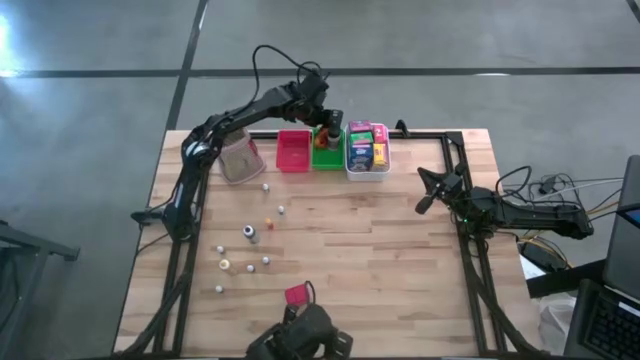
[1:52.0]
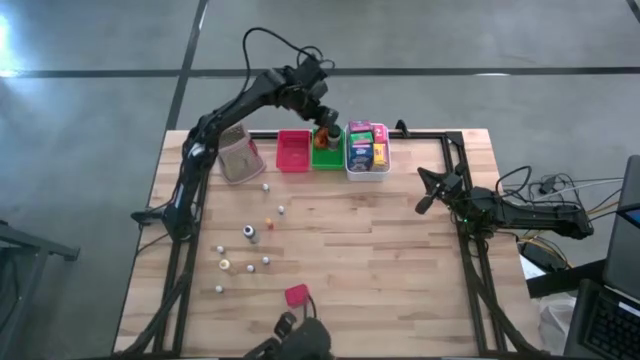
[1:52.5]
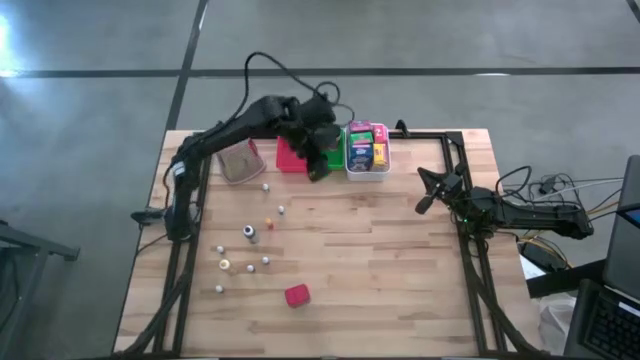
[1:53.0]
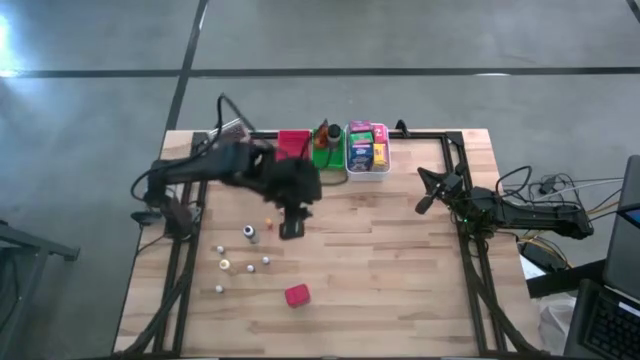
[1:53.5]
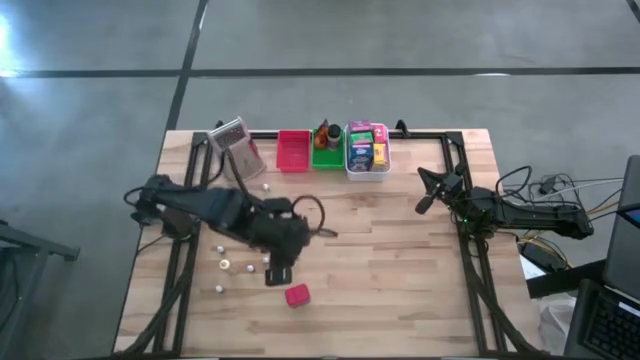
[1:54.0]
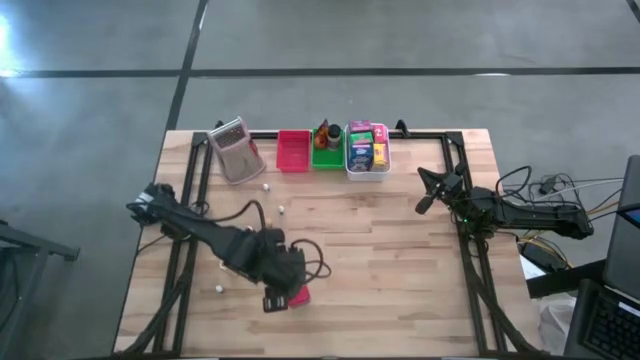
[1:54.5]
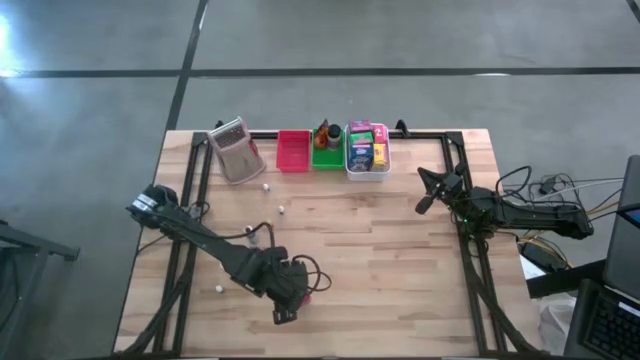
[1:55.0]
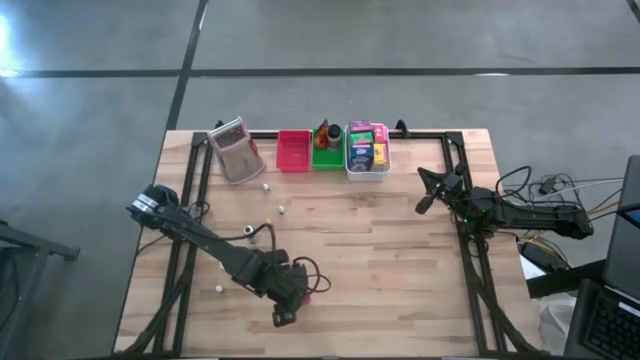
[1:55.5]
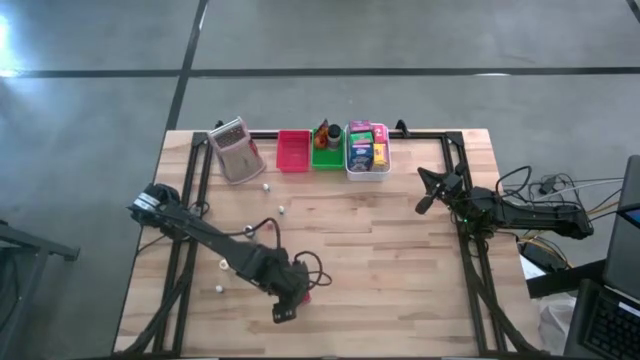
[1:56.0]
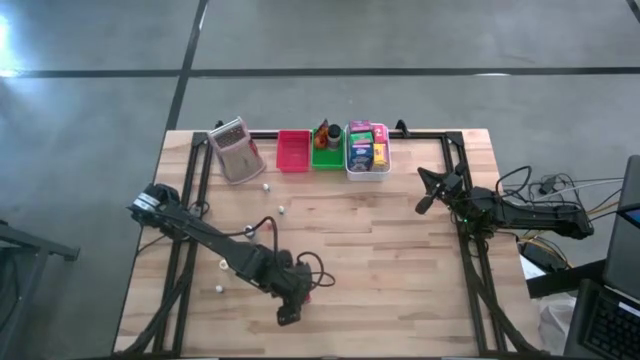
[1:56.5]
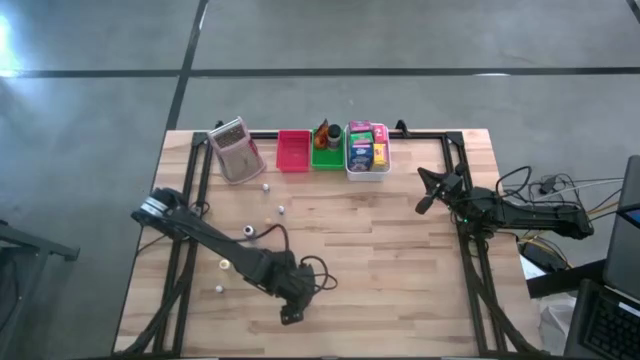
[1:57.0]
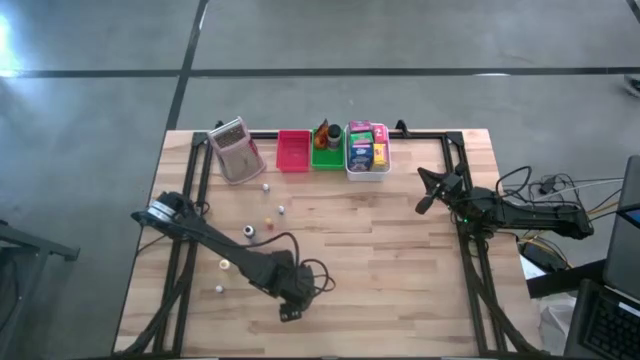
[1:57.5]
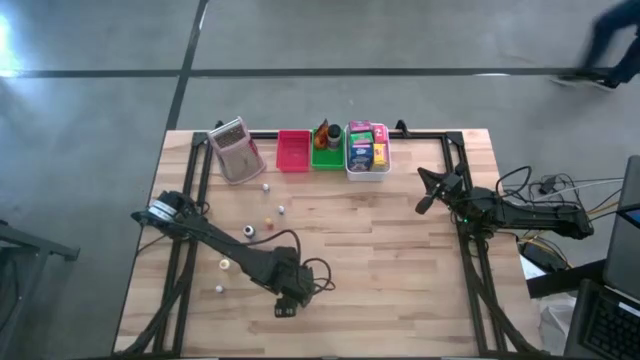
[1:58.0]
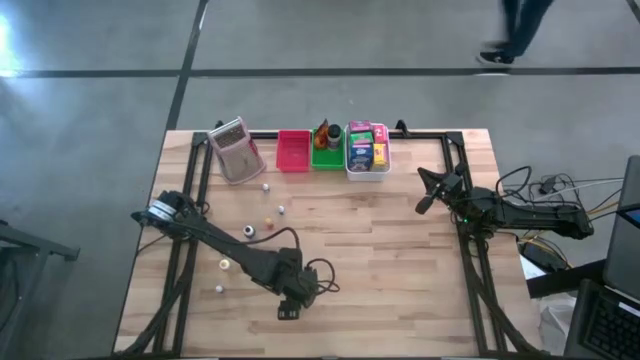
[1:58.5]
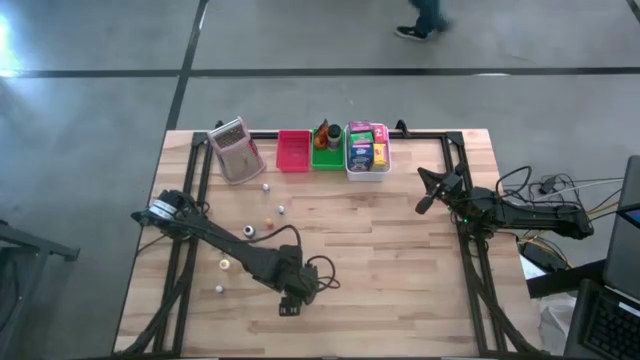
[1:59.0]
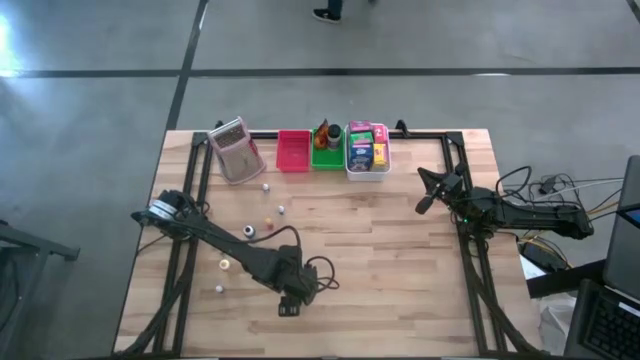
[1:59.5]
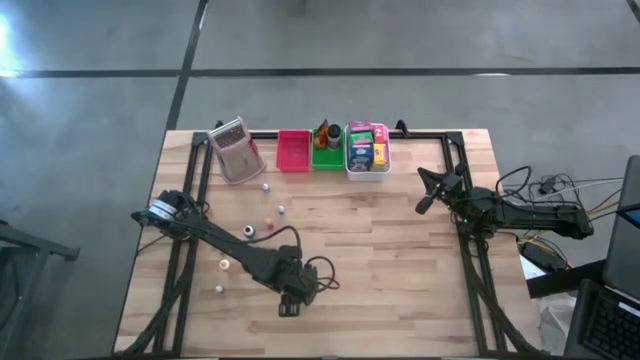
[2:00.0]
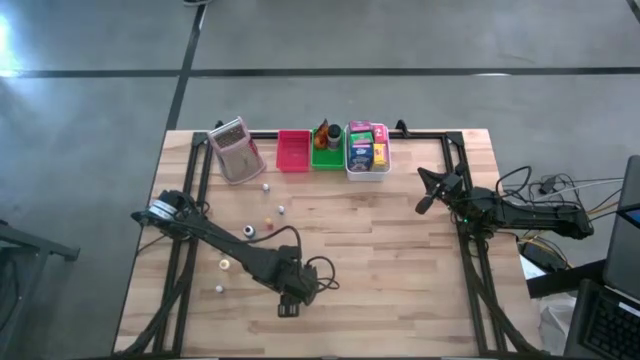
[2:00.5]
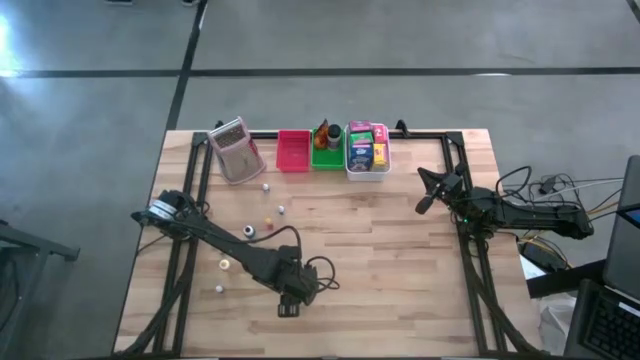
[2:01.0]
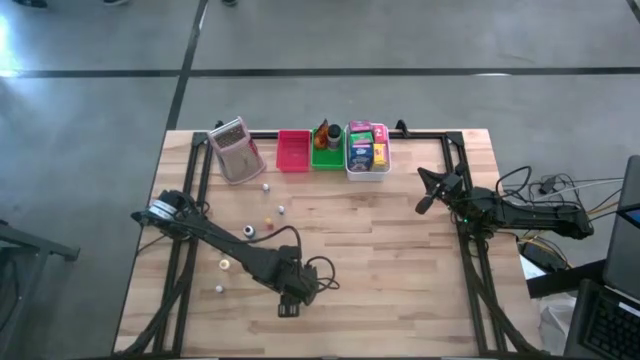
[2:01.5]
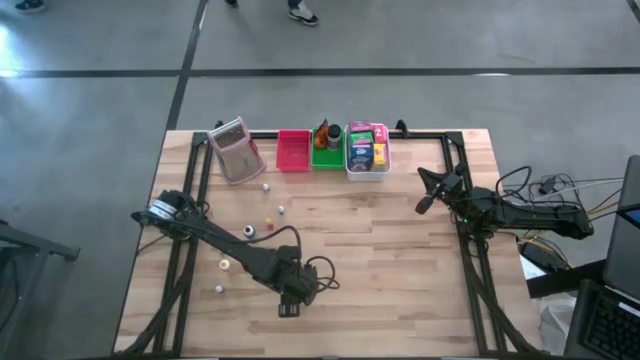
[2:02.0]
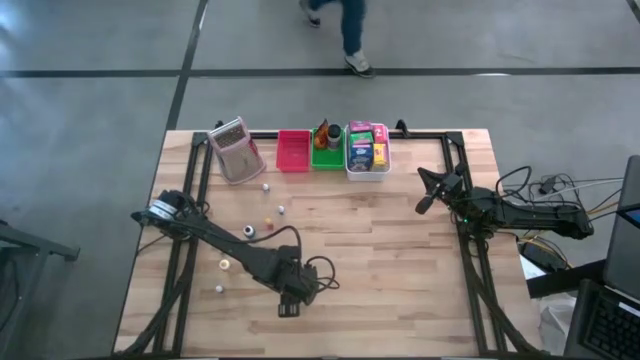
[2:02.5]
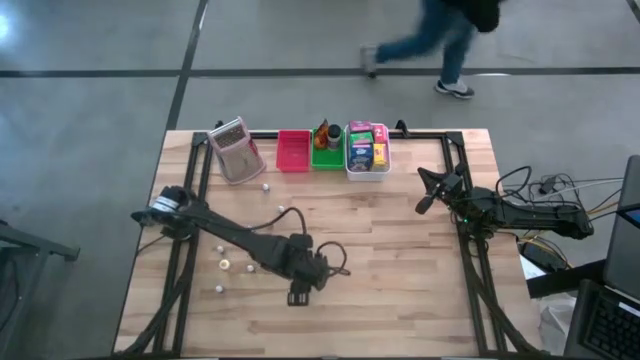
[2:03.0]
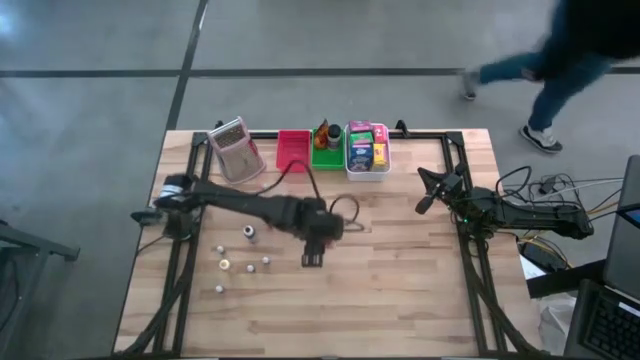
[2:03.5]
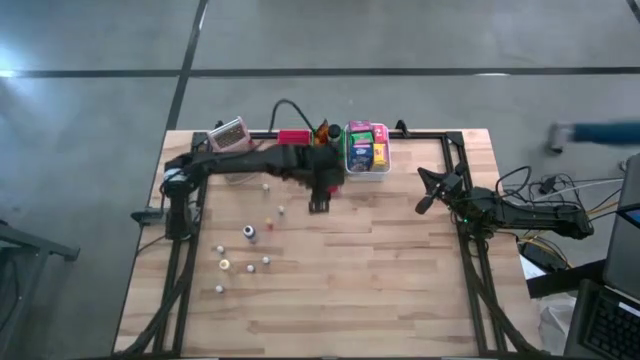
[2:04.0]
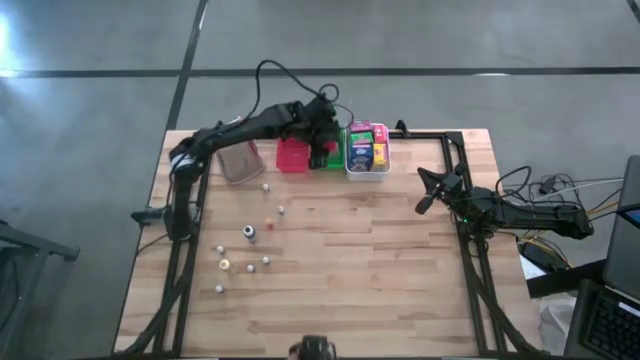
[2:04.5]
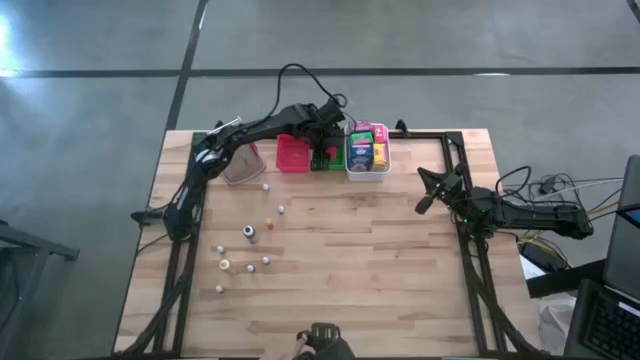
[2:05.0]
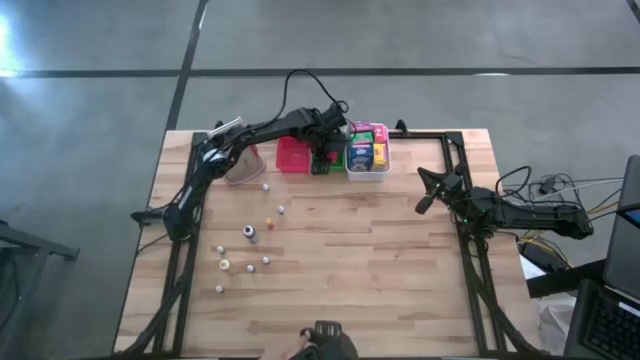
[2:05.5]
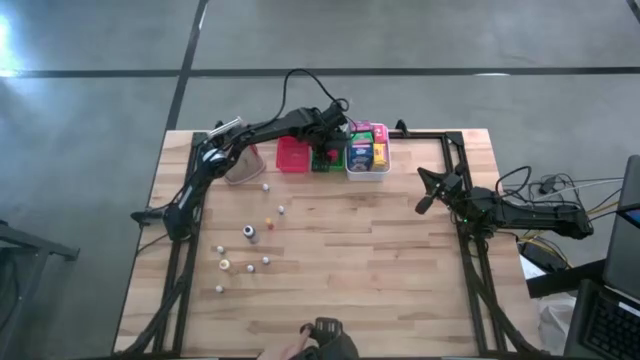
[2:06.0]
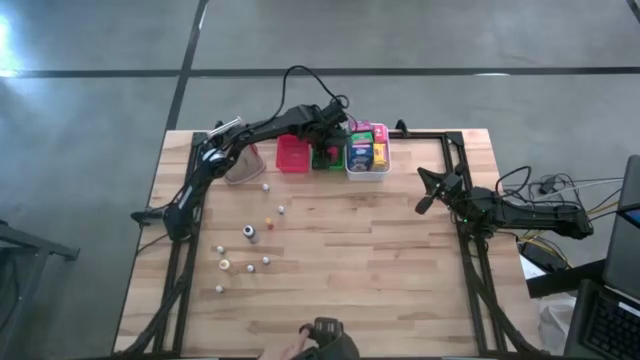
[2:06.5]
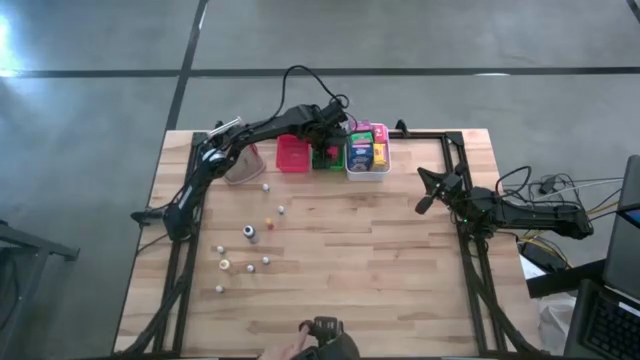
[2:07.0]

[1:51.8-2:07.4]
Task: Pick & Place Kitchen Items
Put the red seasoning can into the green bin

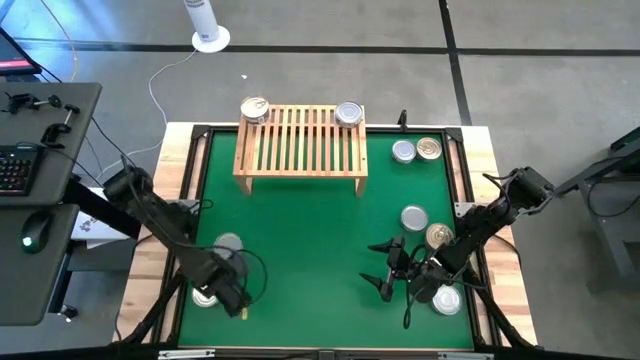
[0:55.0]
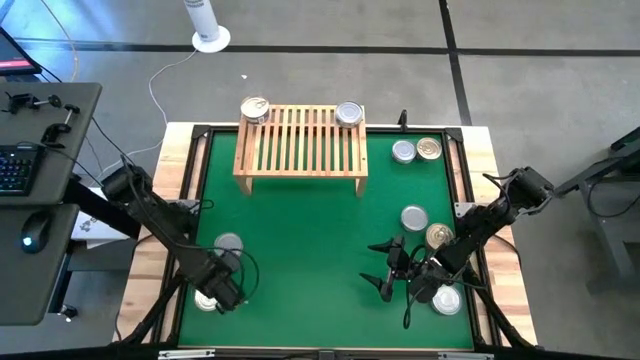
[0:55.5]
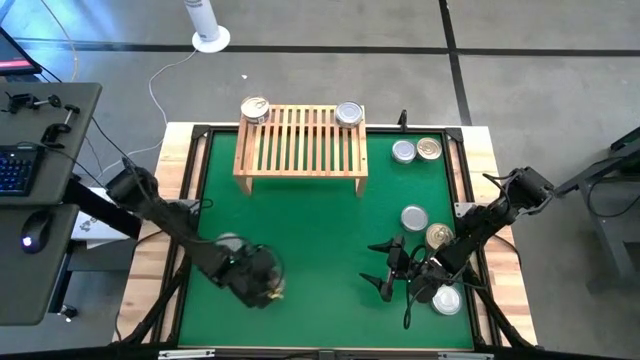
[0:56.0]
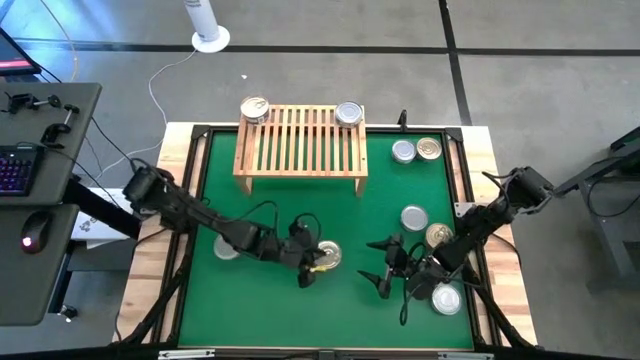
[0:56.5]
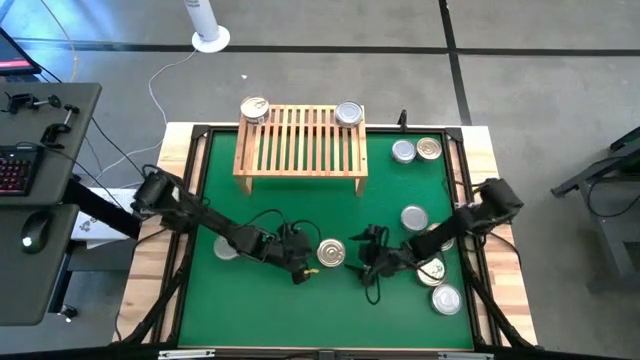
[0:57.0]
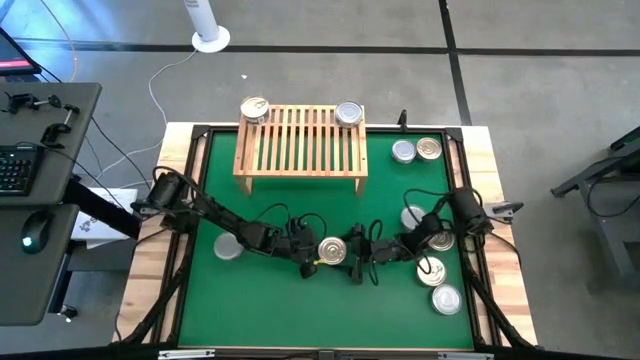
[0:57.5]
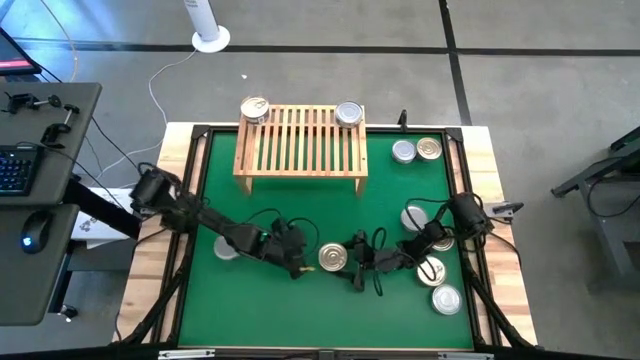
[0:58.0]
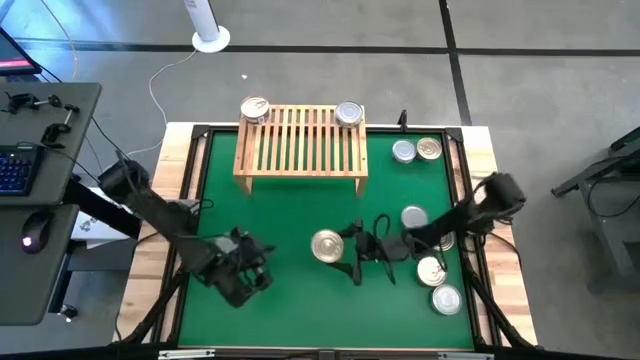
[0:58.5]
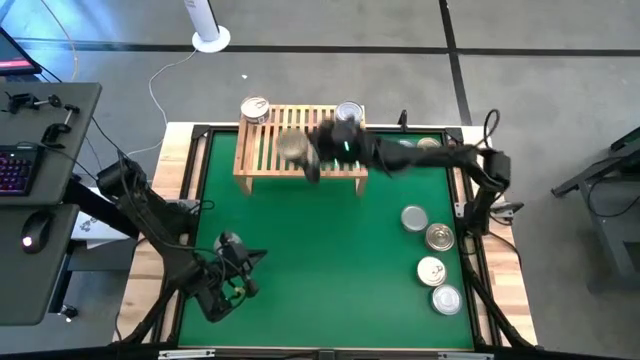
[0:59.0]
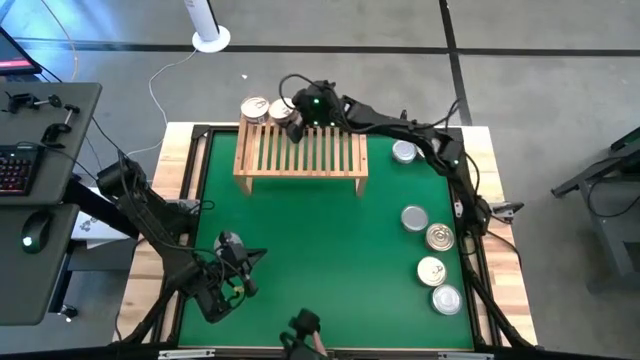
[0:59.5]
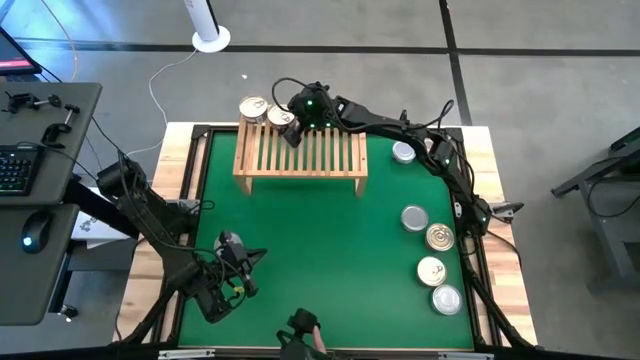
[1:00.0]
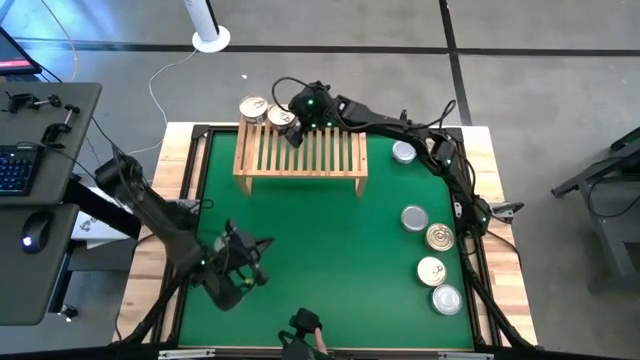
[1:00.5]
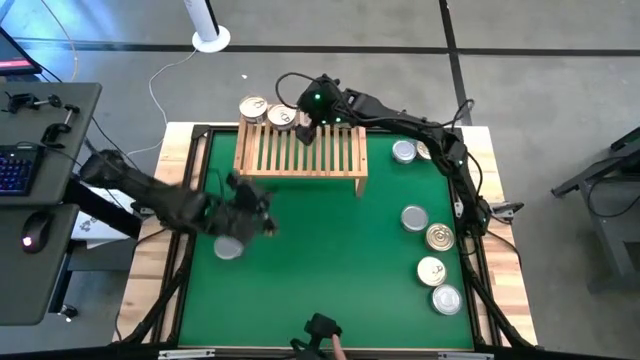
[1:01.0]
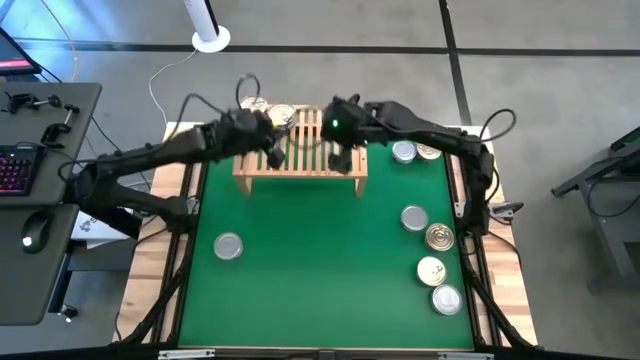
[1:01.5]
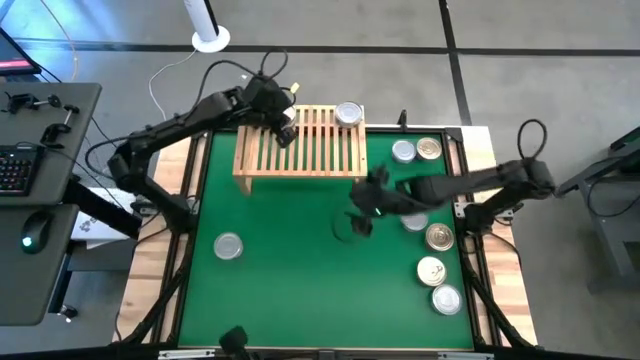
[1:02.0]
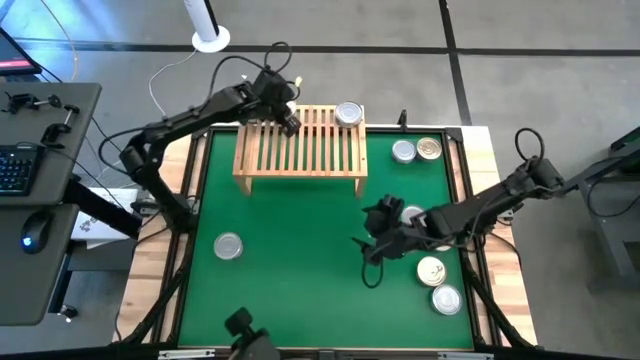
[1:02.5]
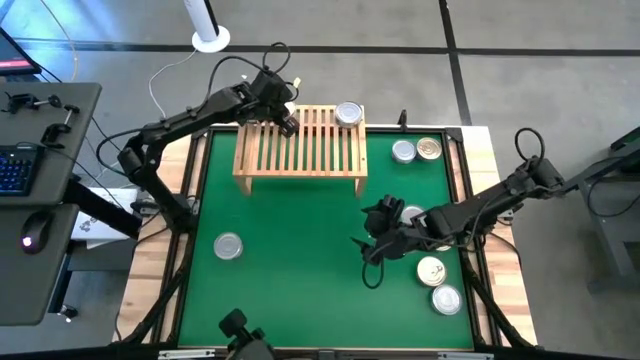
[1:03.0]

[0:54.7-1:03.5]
Task: Stack canned seafood by type on shelf
Put the blue pink tuna can on the shelf
